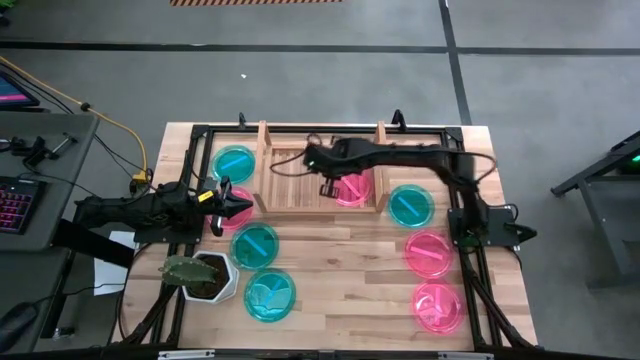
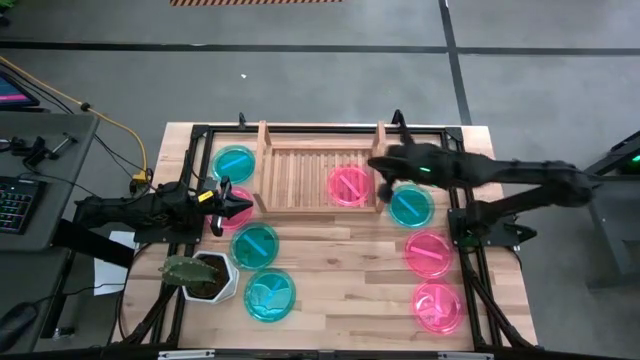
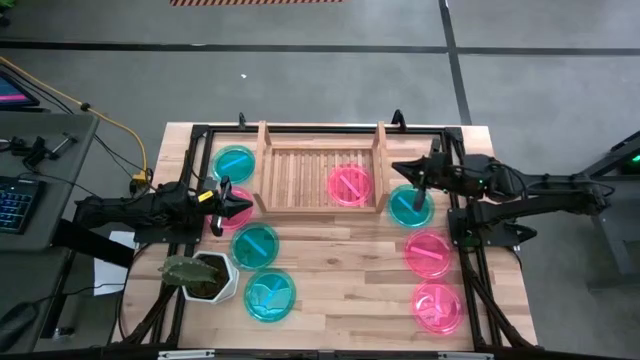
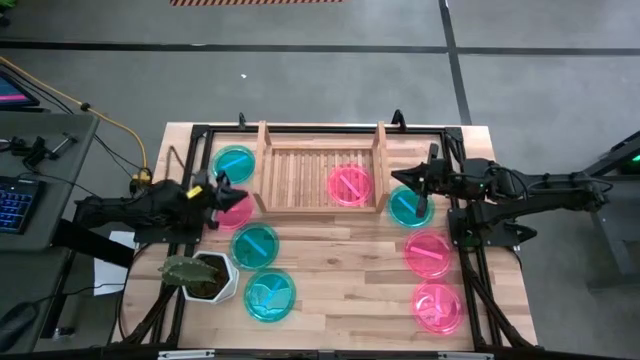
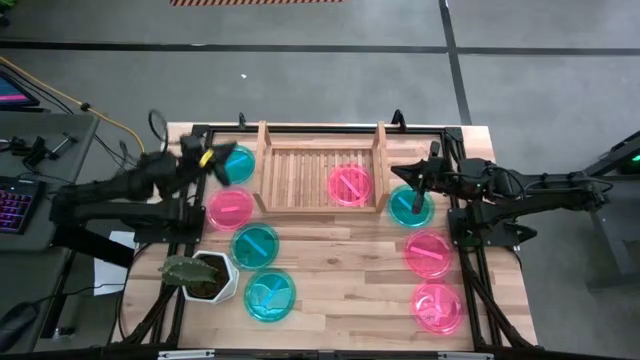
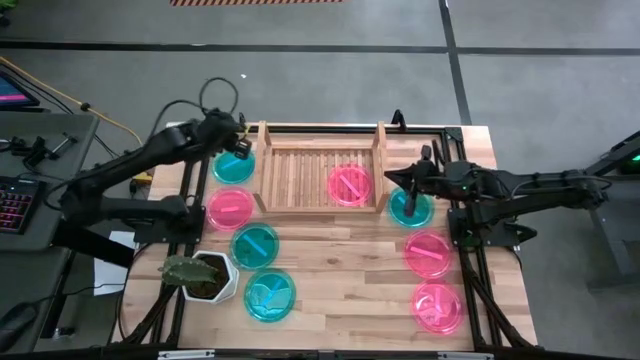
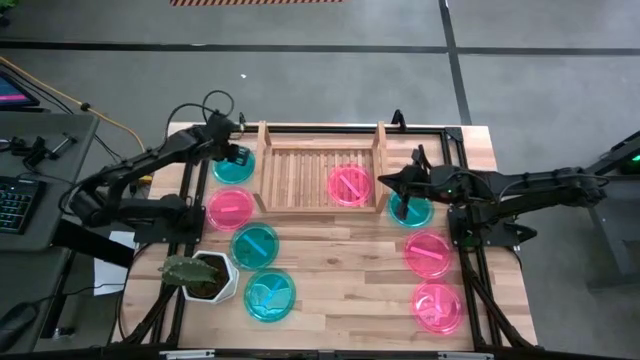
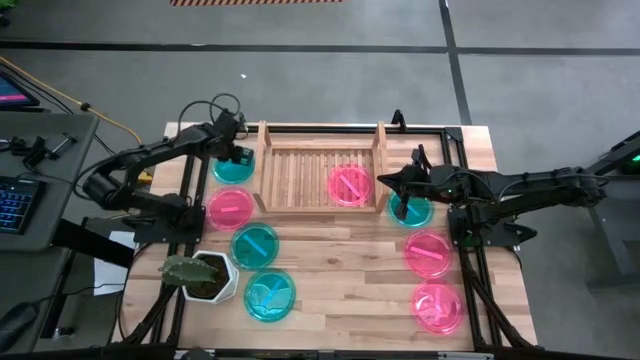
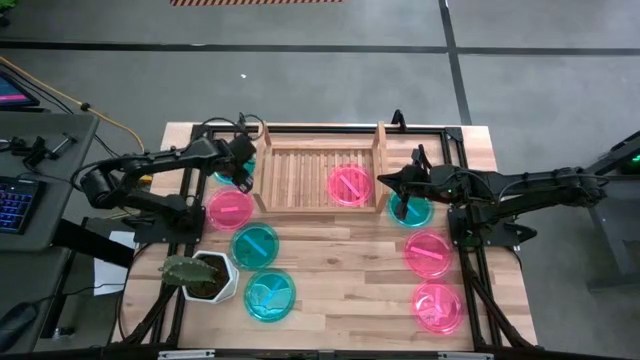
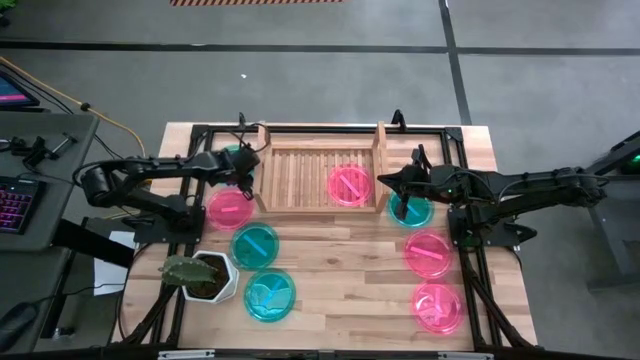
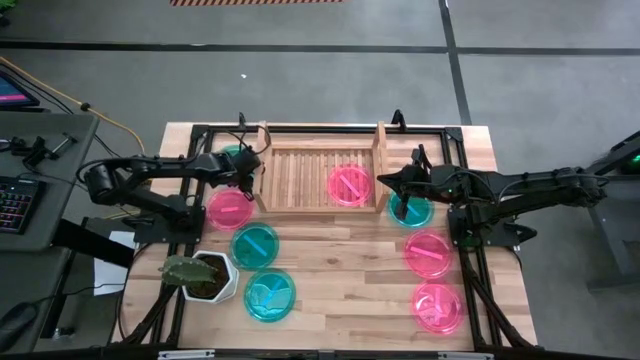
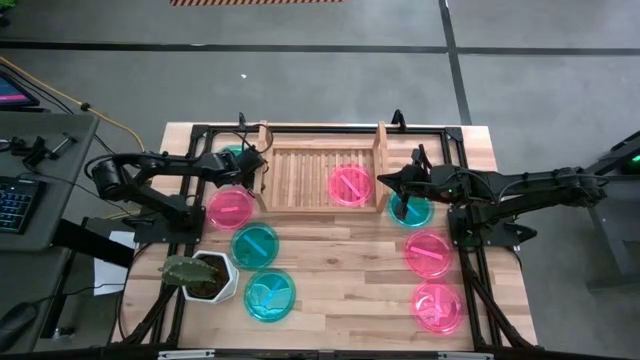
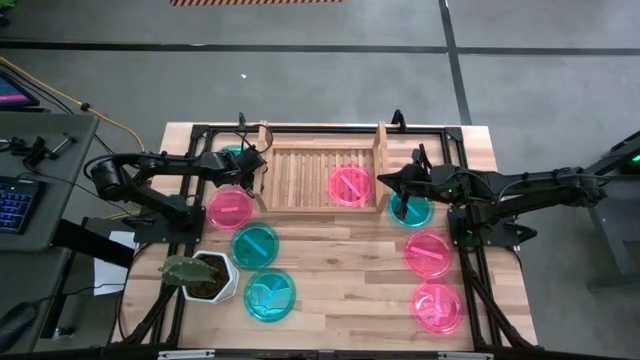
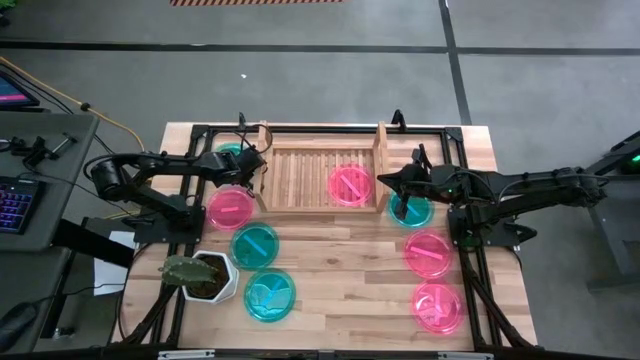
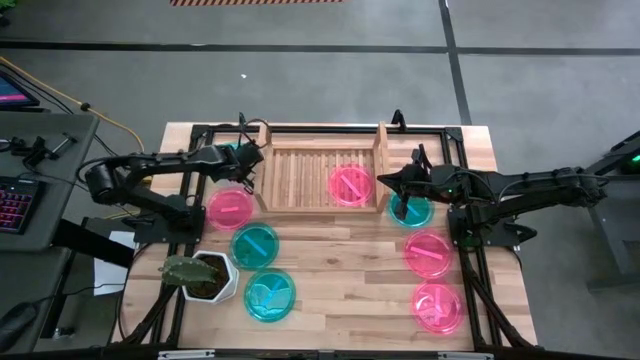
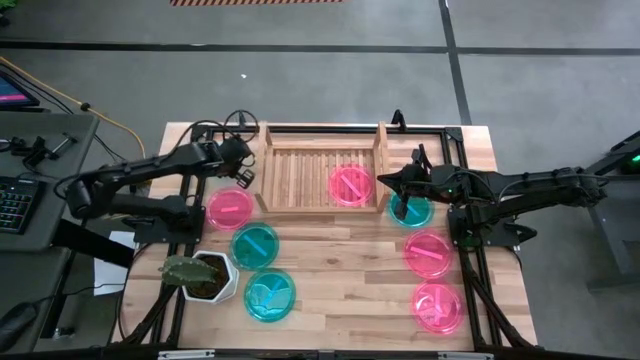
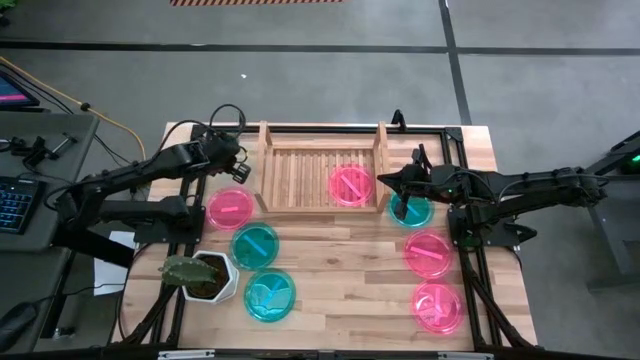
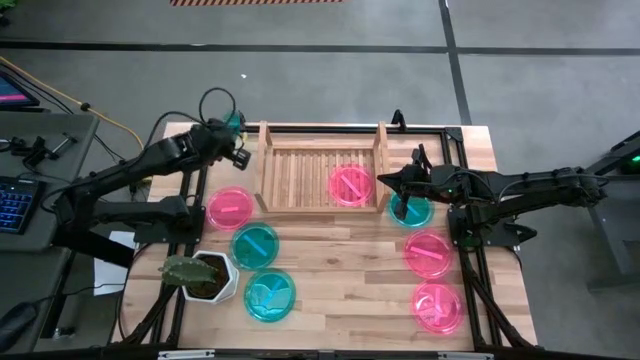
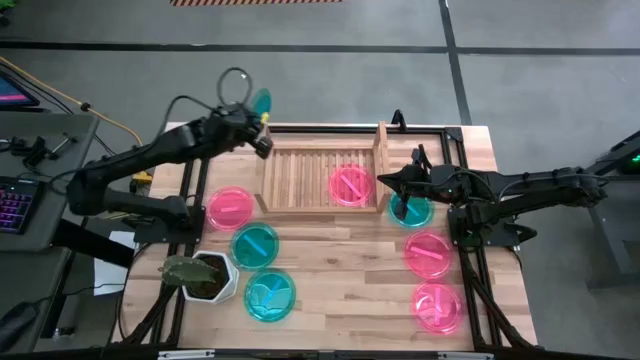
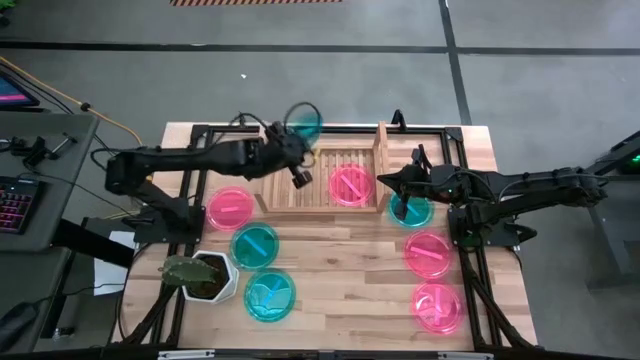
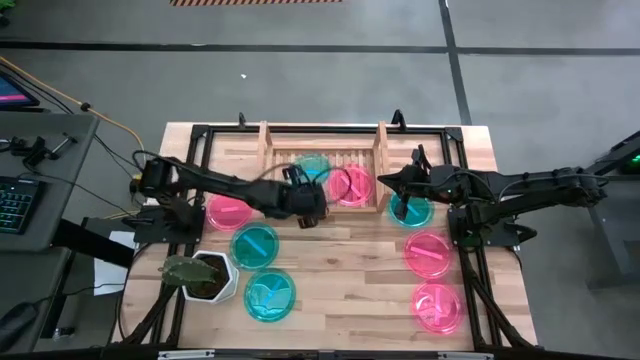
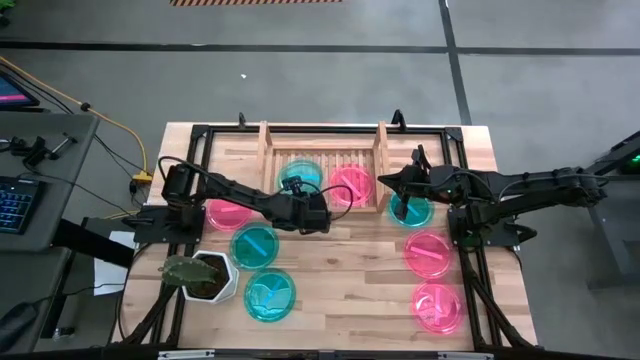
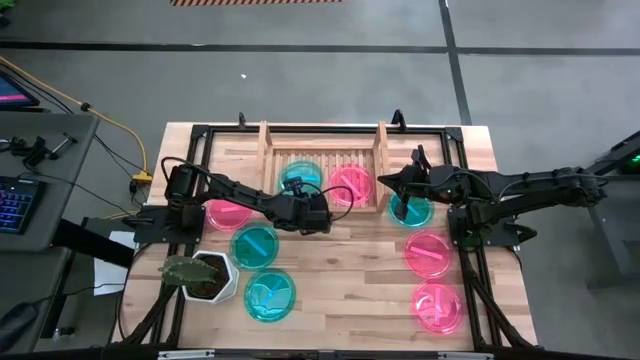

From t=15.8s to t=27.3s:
Task: Place and stack plates onto a shelf
Put the blue plate on the shelf

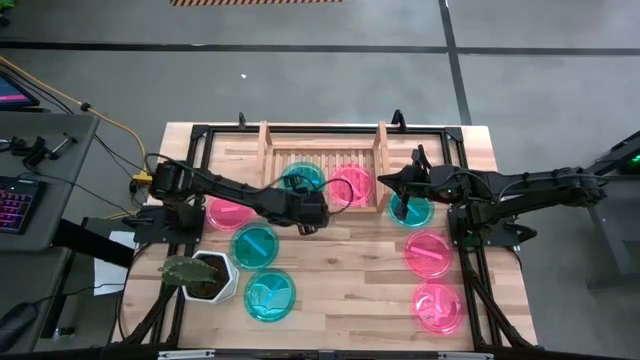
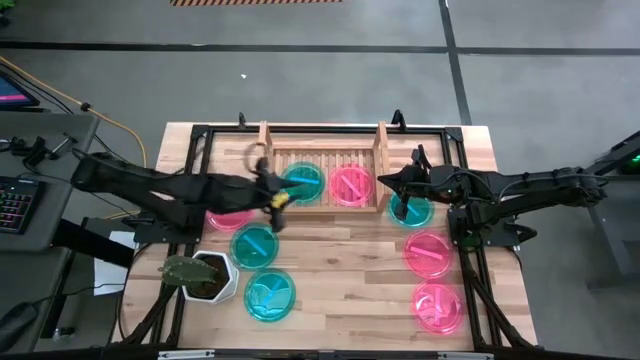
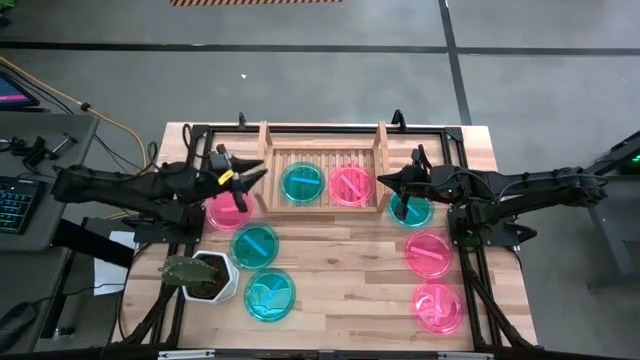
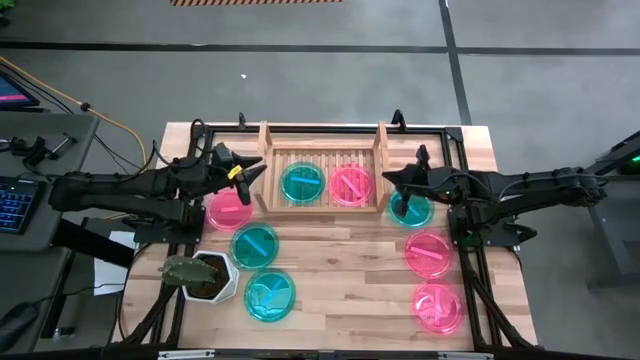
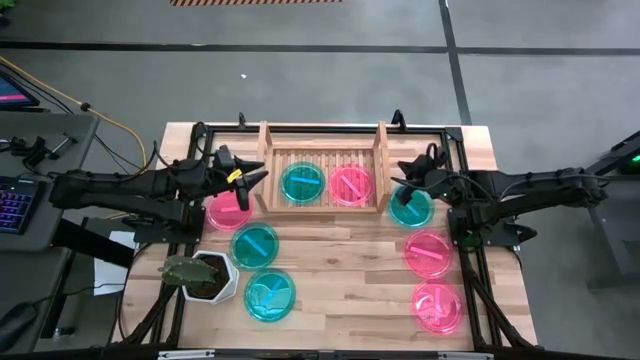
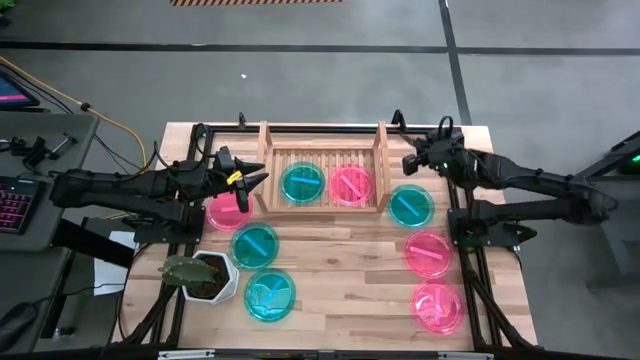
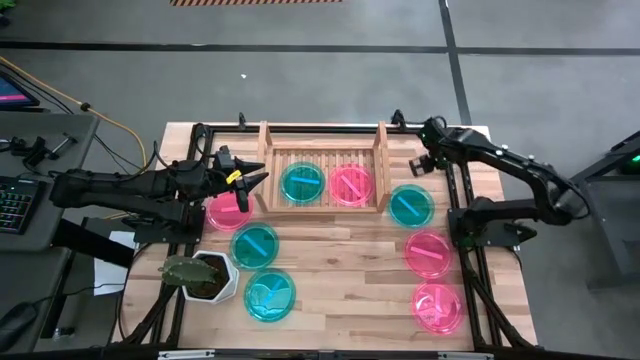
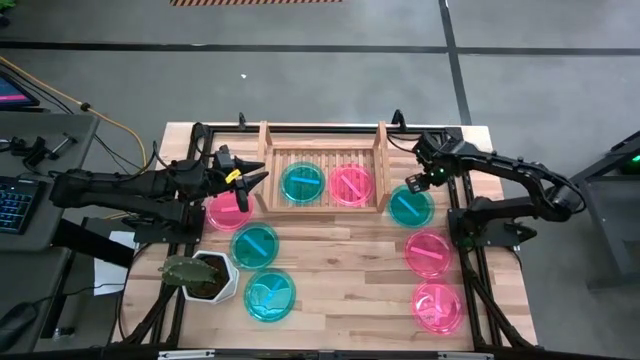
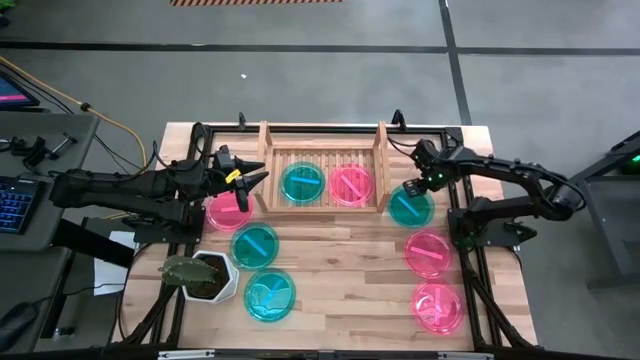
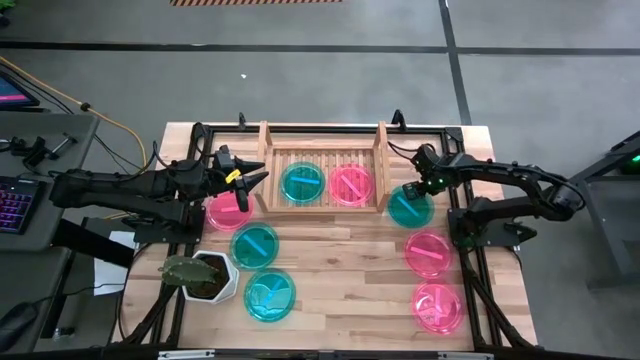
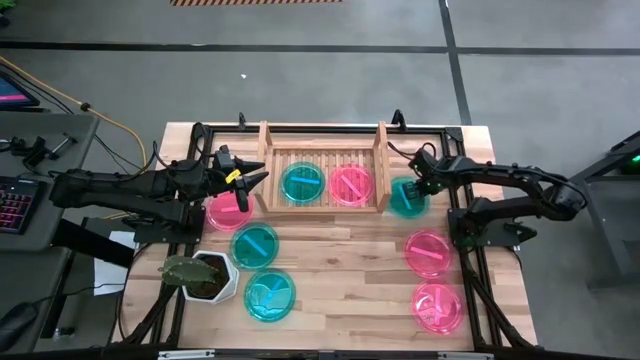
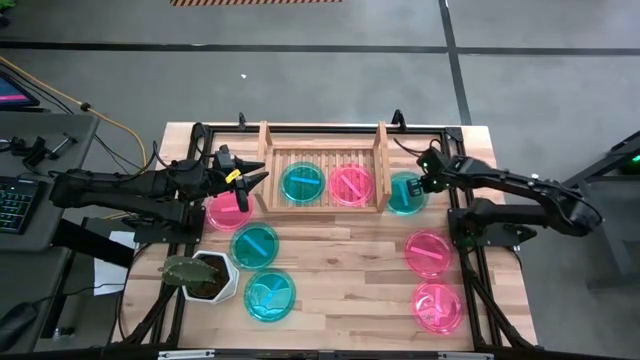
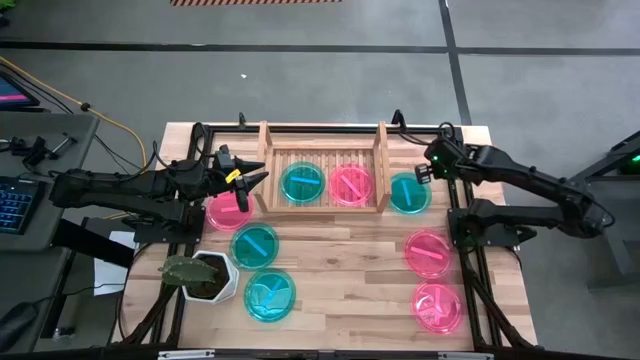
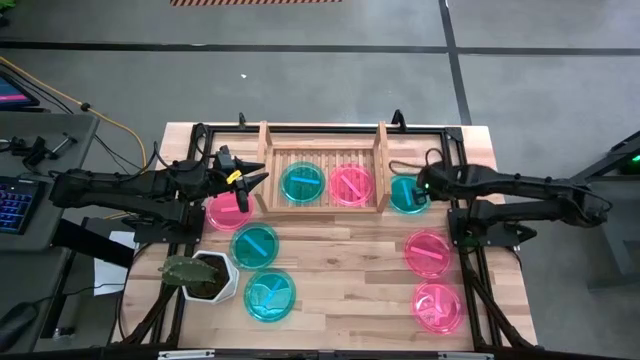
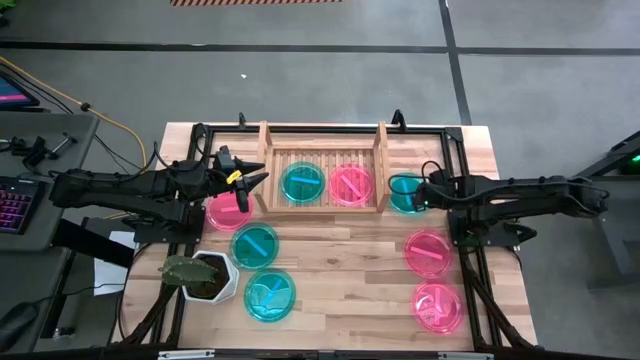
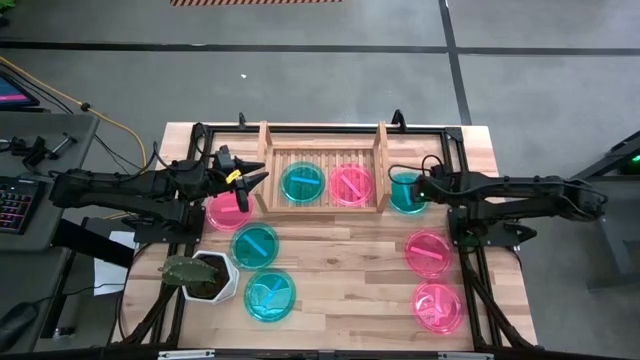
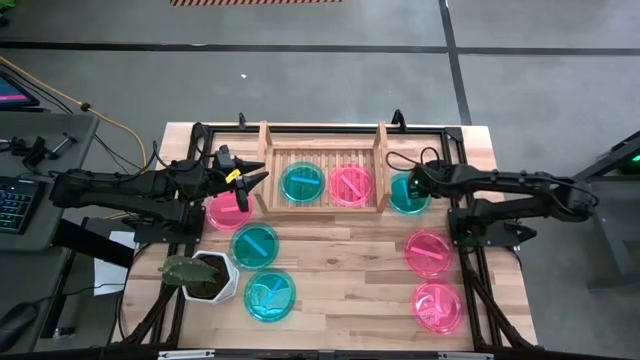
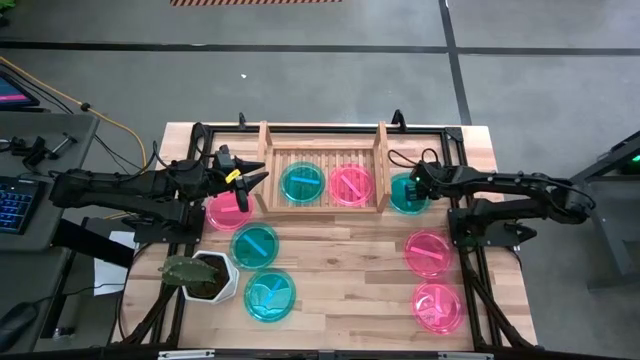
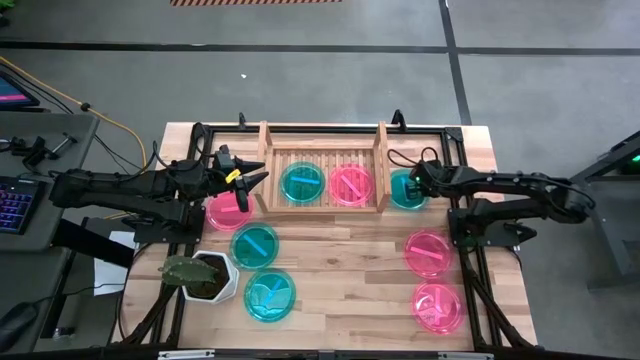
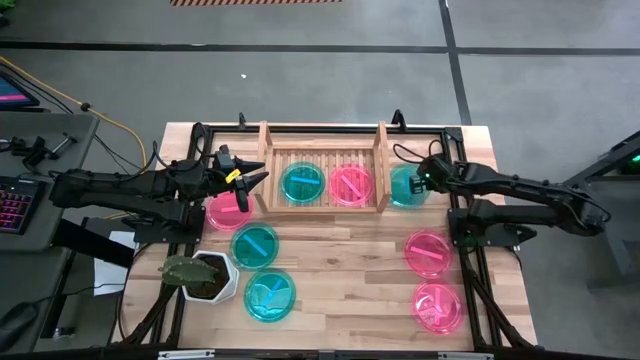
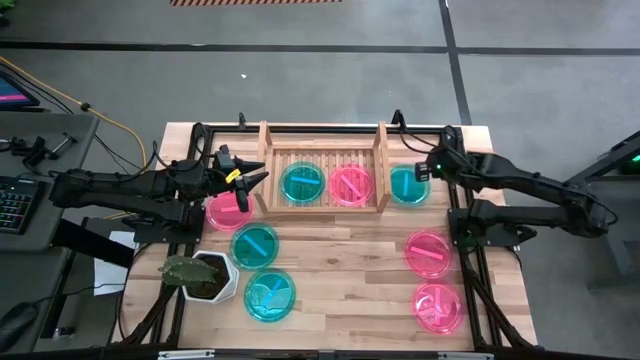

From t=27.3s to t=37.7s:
Stack the blue plate on top of the blue plate on the shelf
